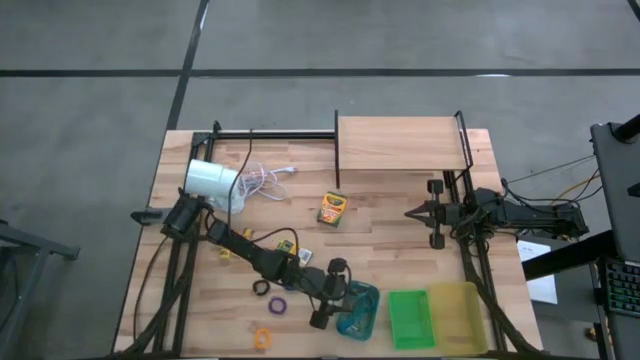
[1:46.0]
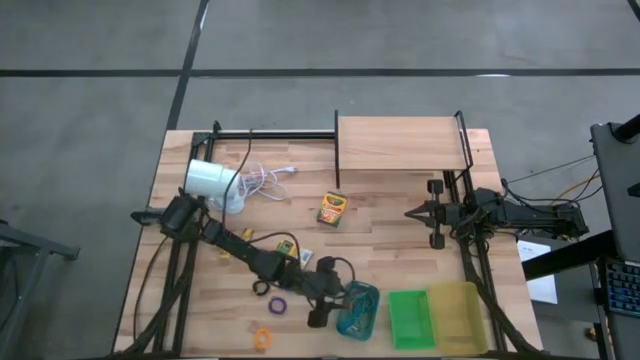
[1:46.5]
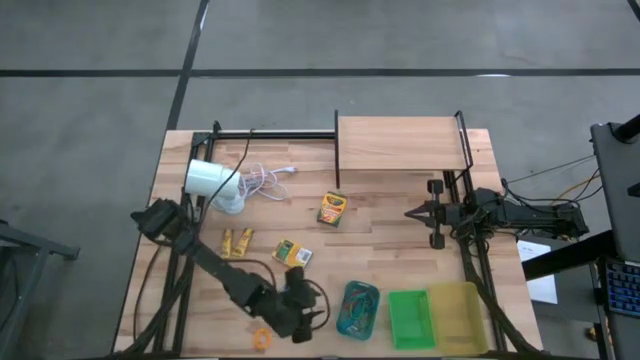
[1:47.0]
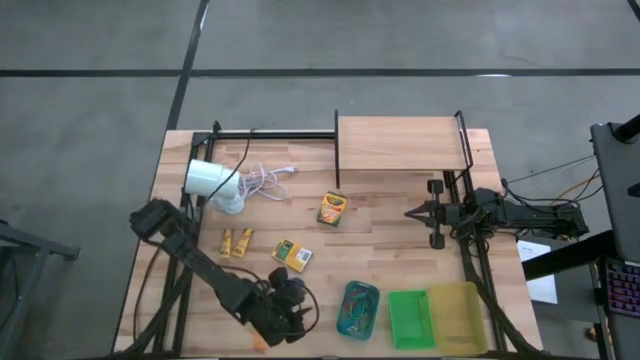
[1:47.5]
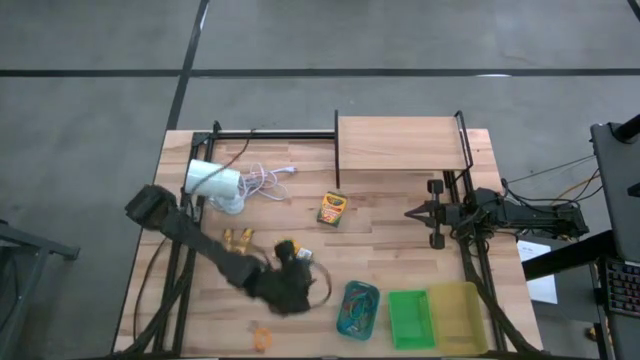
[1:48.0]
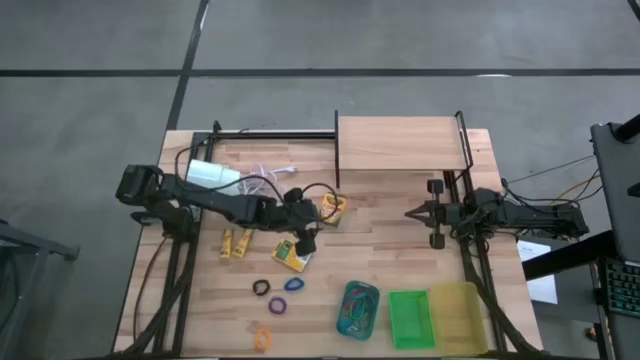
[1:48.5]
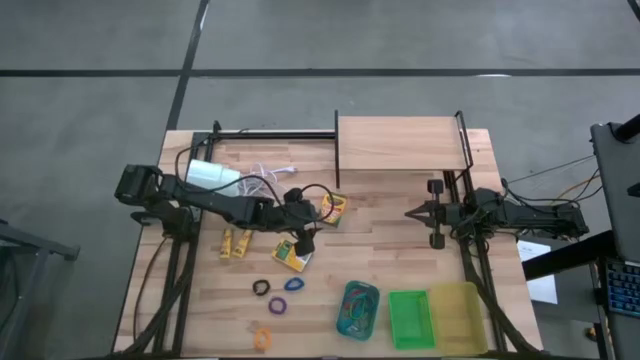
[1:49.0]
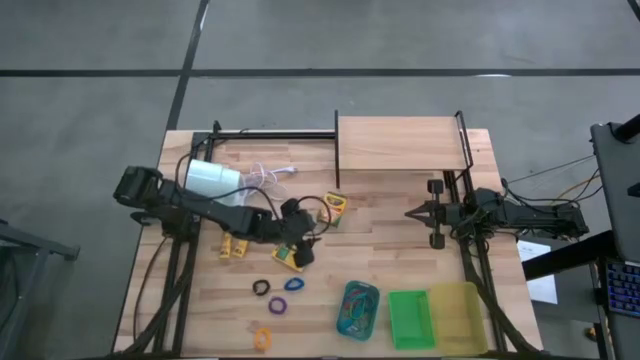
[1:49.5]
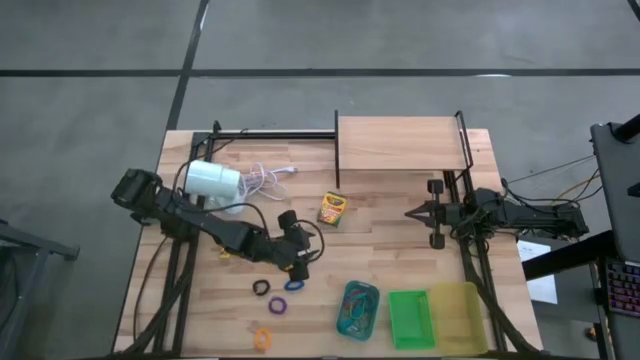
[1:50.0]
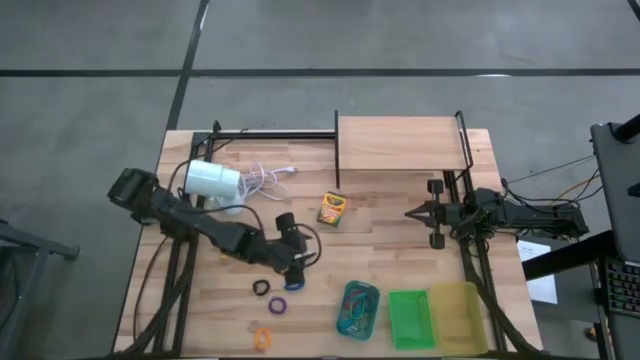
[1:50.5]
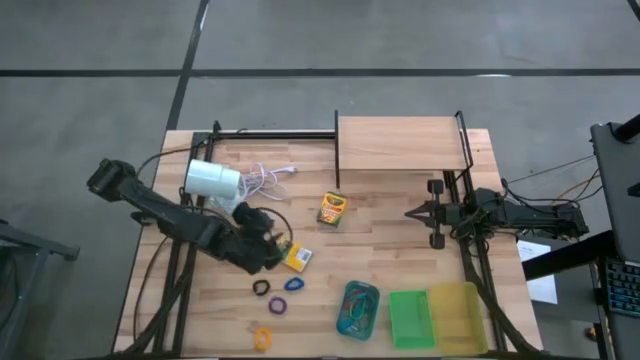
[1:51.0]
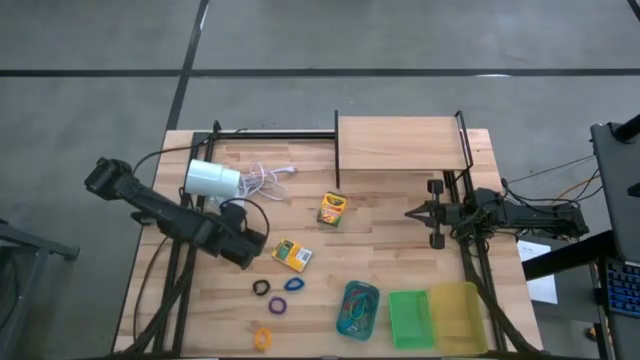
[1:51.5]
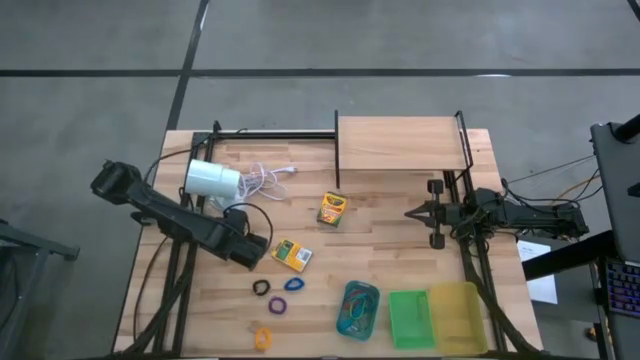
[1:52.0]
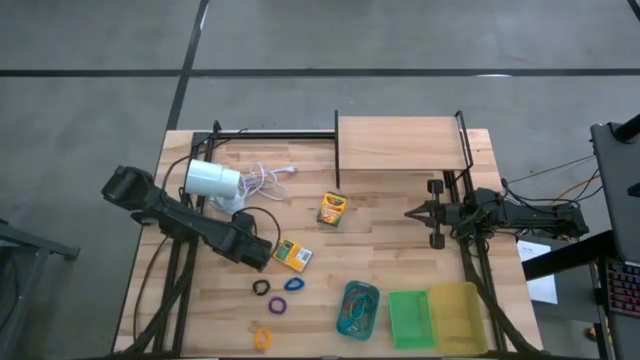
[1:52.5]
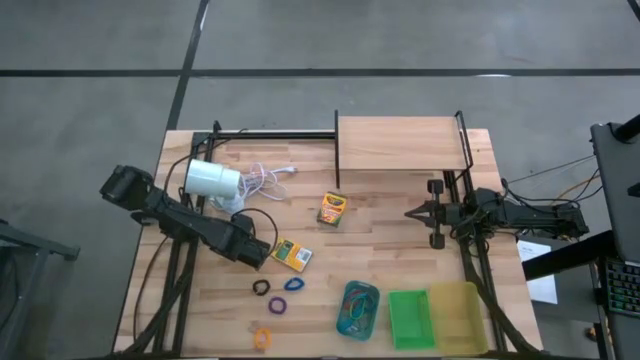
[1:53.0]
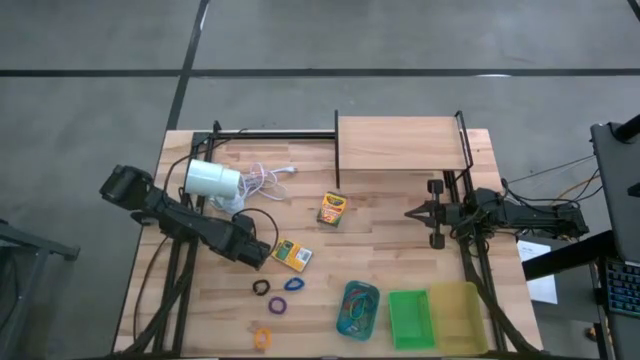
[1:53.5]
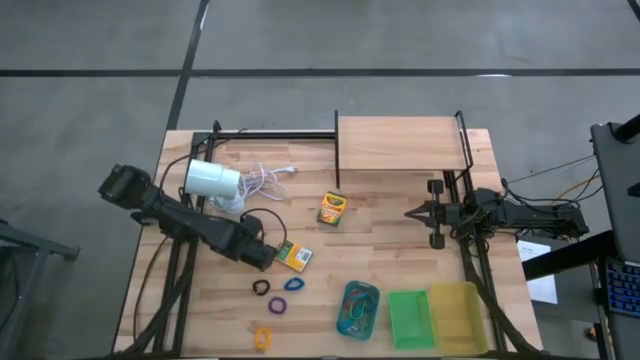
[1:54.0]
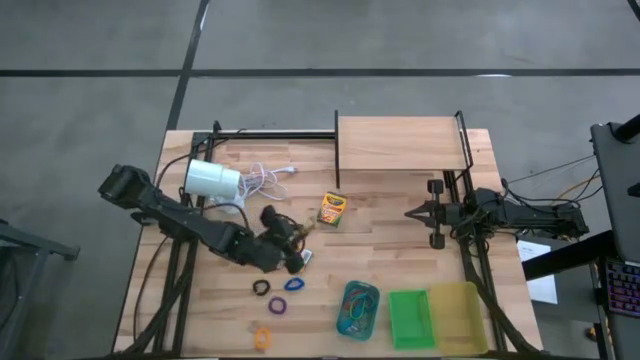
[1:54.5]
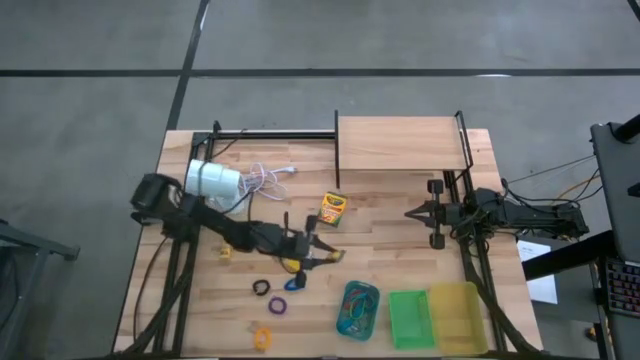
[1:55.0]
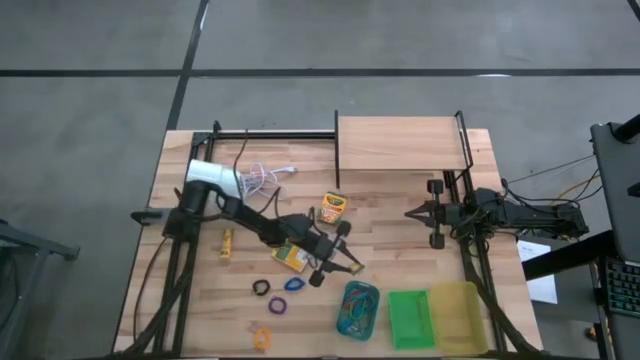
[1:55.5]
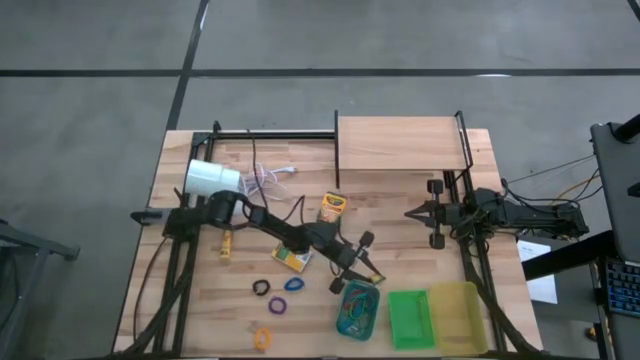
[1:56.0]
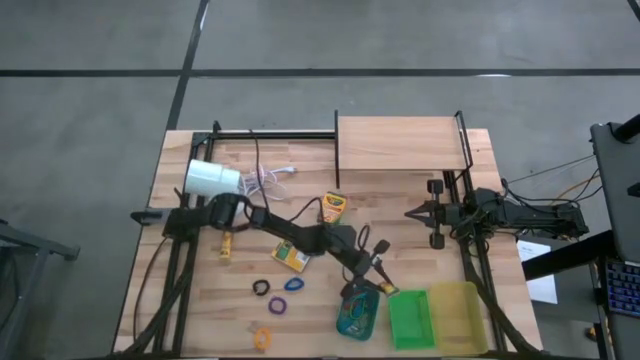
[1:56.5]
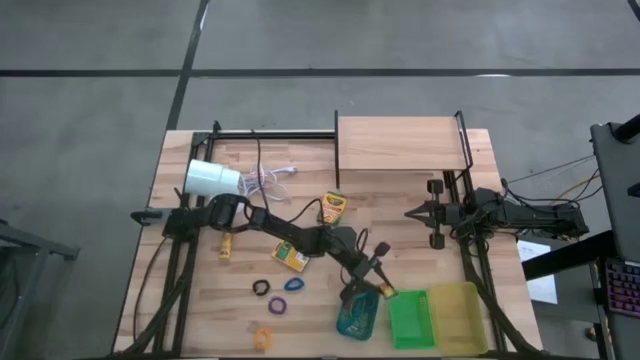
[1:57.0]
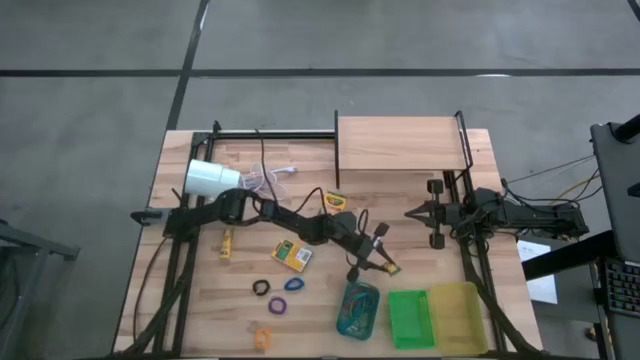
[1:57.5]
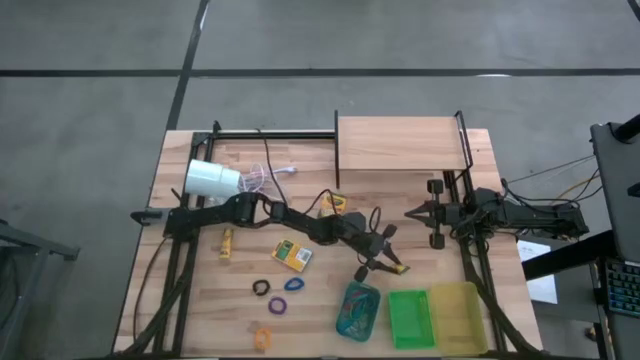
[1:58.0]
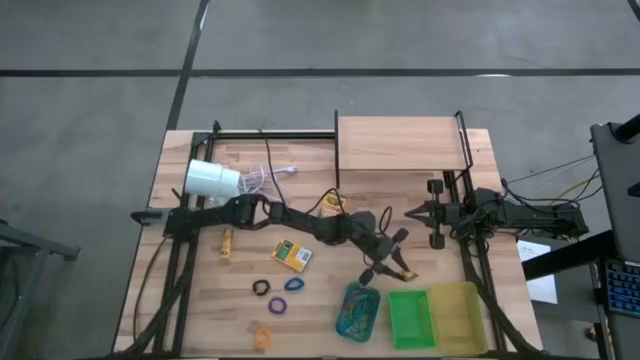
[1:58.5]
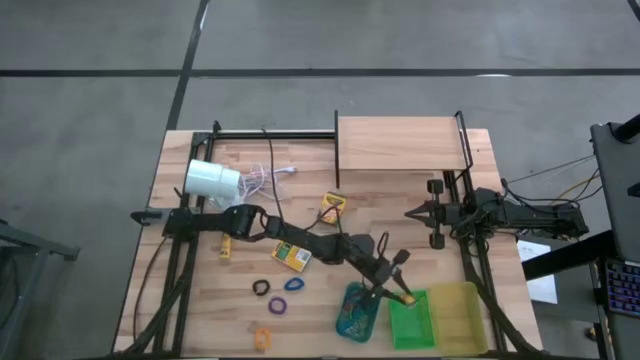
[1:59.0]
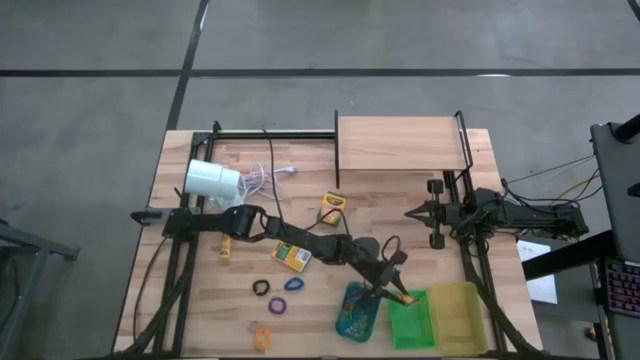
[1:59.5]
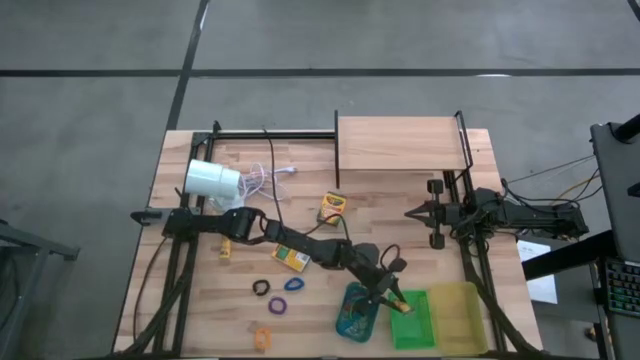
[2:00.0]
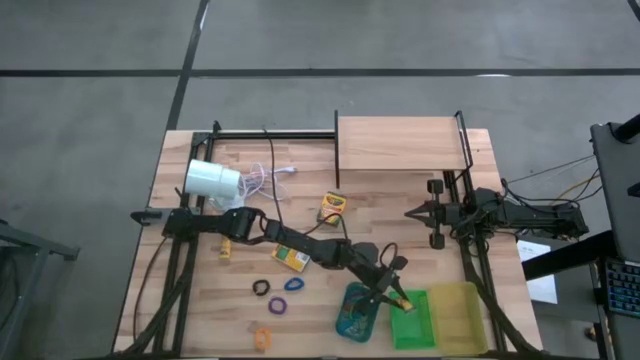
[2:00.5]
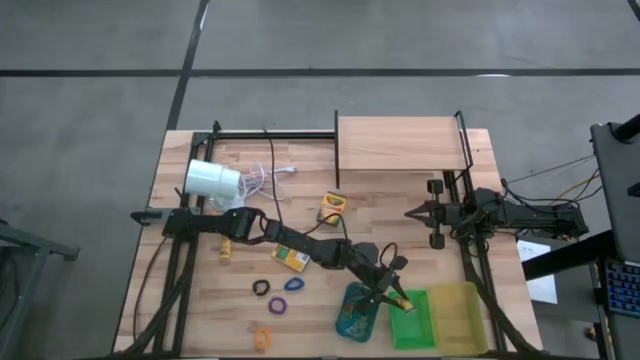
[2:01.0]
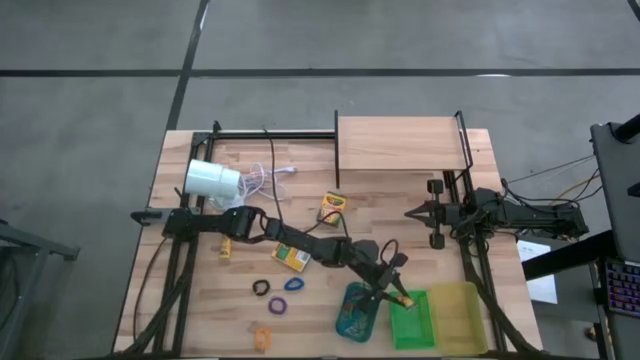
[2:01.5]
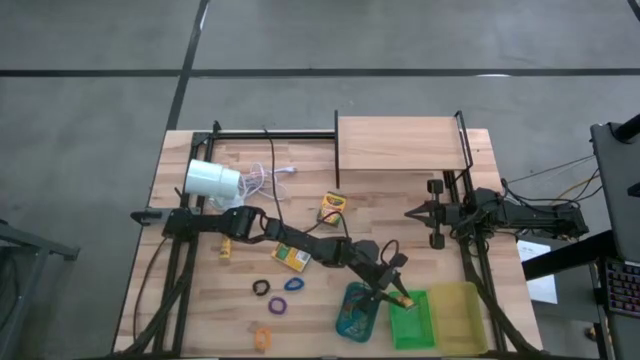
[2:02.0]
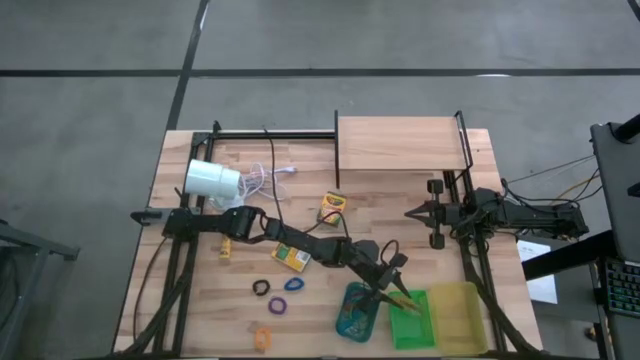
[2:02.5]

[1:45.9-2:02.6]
Task: Pick & Place Office Desk Supplies
Put the crayon box into the green bin

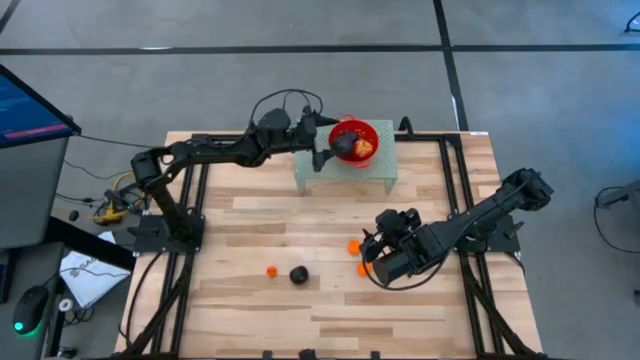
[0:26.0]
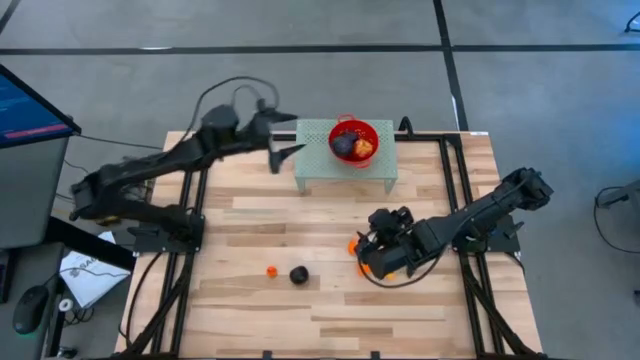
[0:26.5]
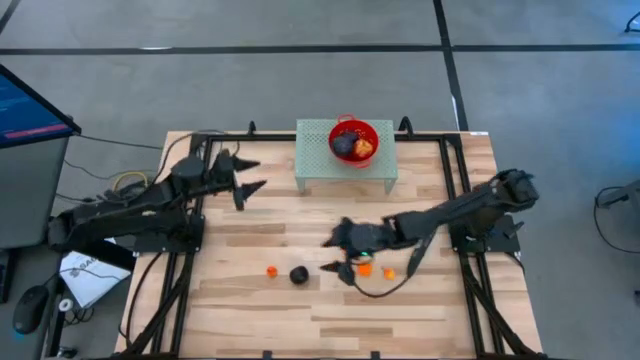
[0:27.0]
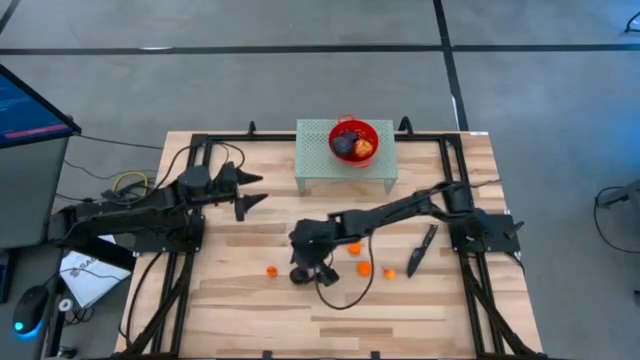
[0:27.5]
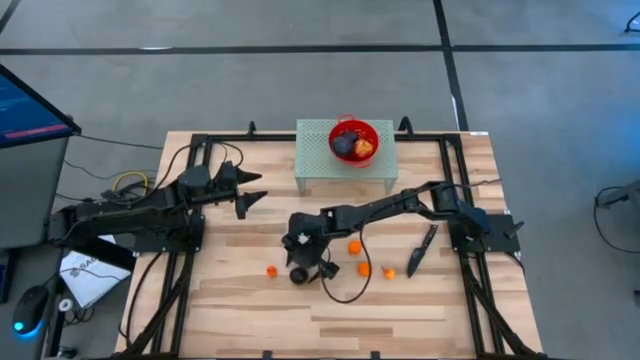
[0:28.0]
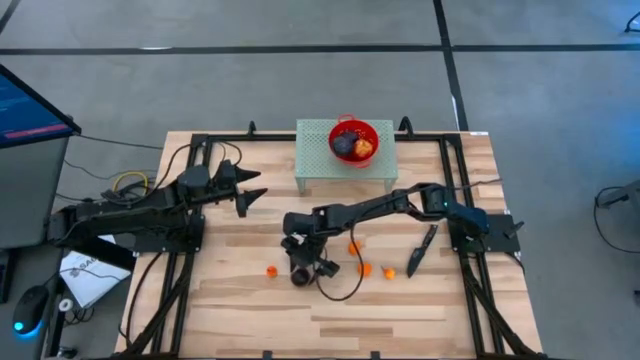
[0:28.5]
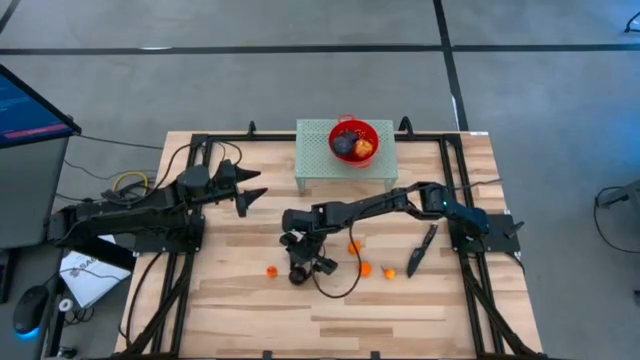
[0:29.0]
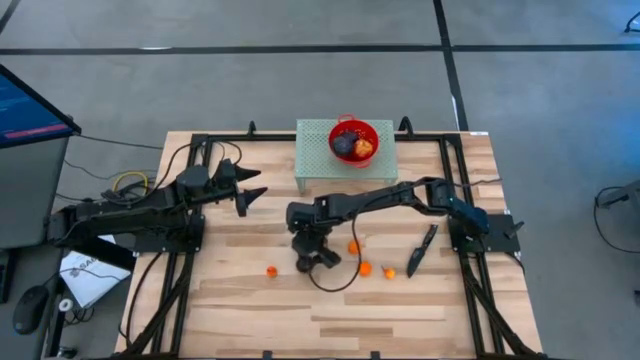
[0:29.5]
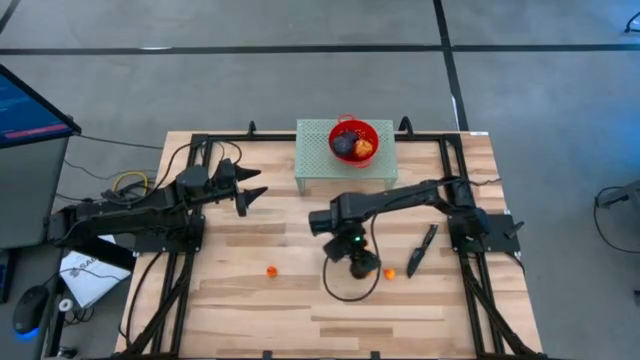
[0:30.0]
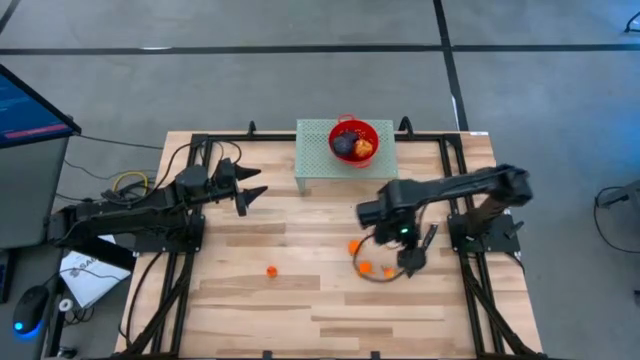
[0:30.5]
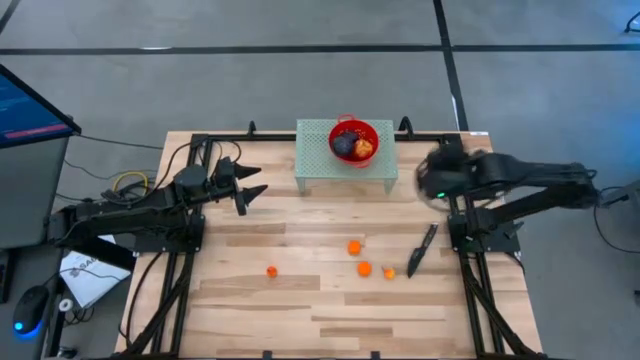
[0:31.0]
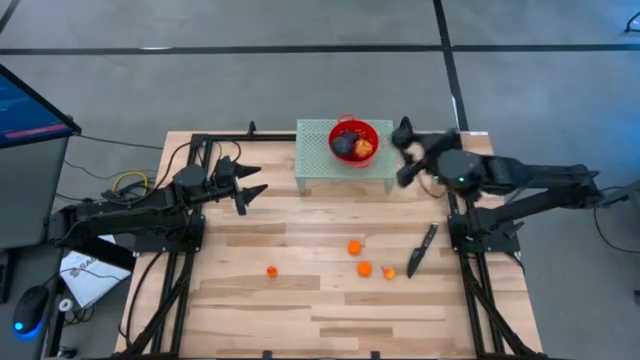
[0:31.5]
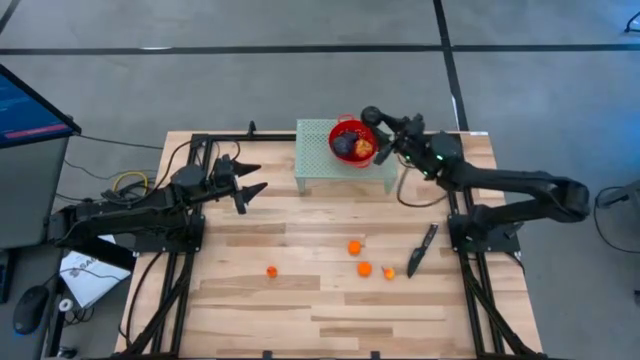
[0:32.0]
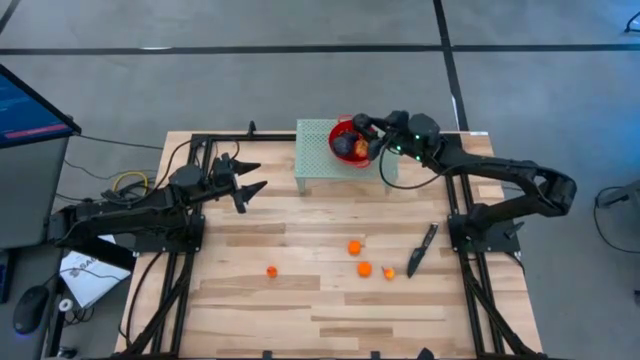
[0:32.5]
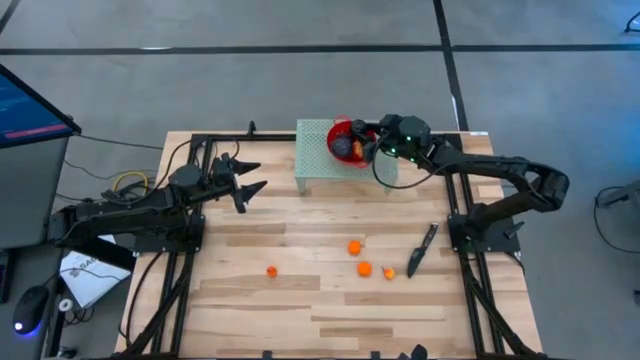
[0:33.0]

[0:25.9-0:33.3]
Task: Pick & Place Fruit
Put the black plum into the red strainer bowl on the shelf
